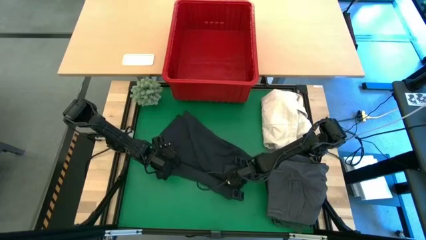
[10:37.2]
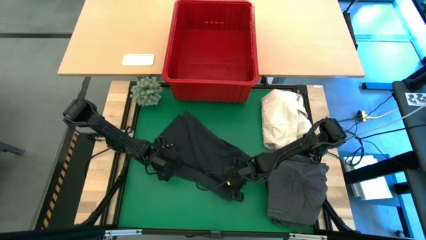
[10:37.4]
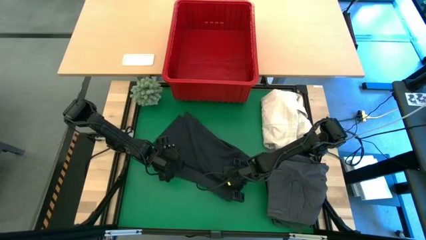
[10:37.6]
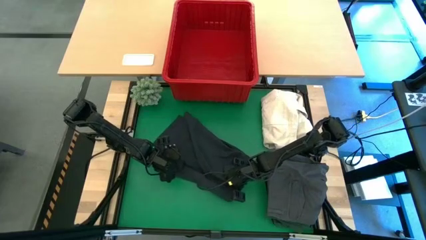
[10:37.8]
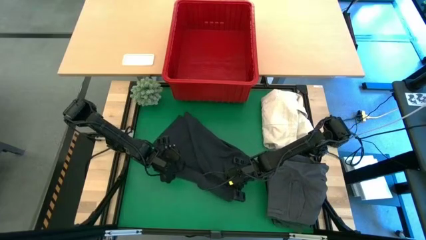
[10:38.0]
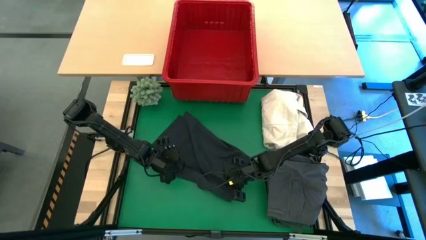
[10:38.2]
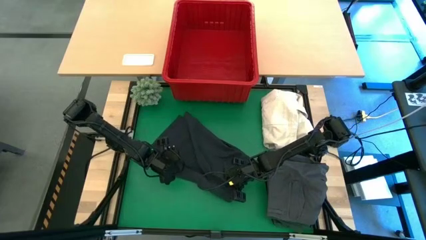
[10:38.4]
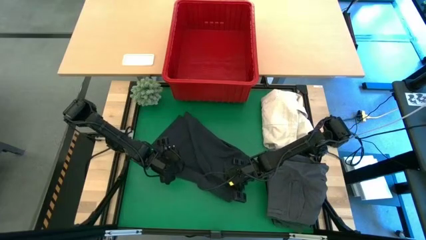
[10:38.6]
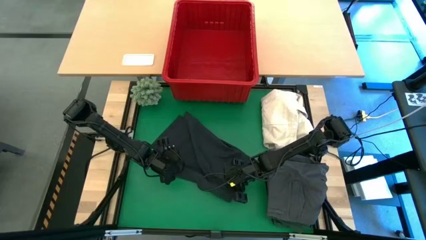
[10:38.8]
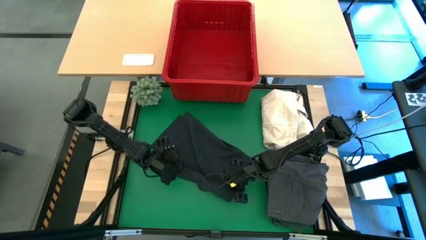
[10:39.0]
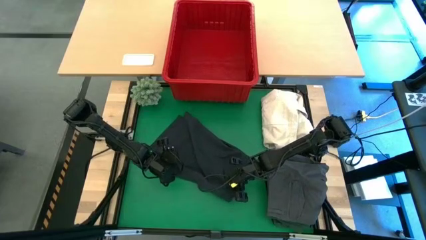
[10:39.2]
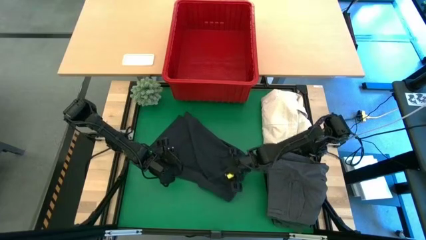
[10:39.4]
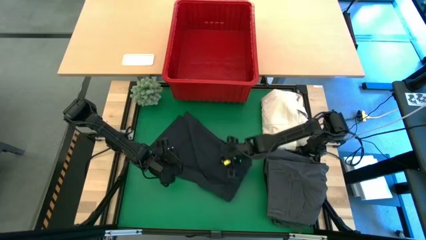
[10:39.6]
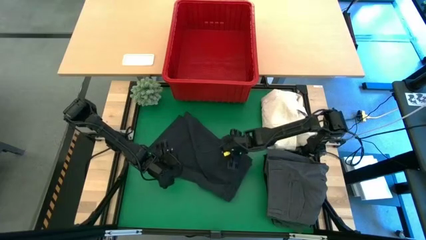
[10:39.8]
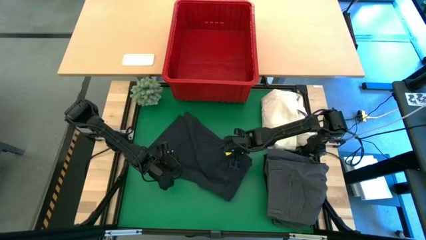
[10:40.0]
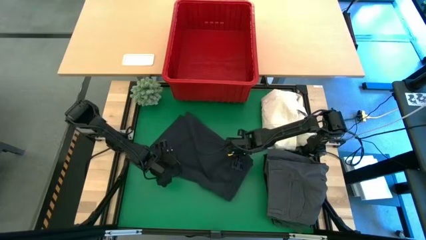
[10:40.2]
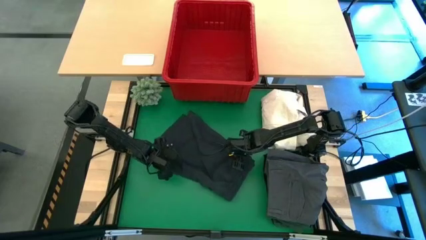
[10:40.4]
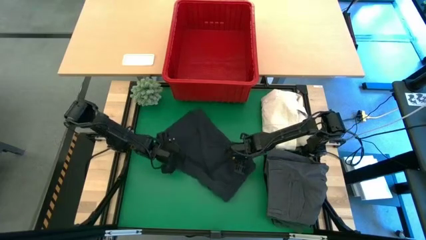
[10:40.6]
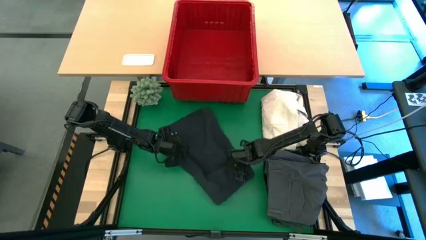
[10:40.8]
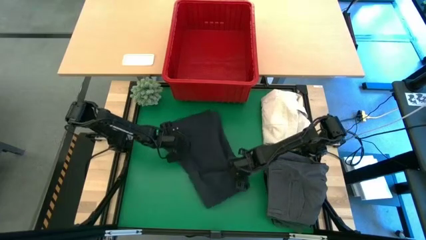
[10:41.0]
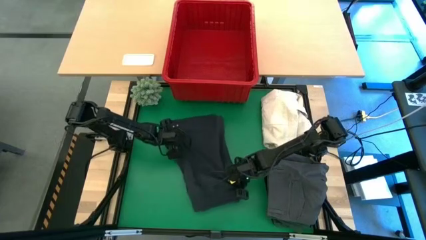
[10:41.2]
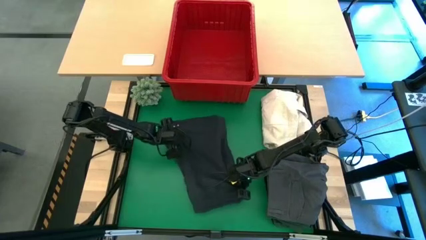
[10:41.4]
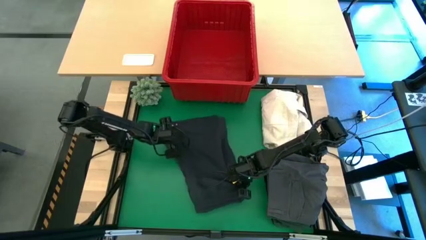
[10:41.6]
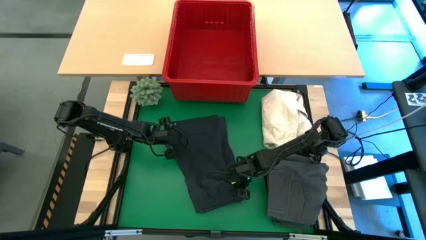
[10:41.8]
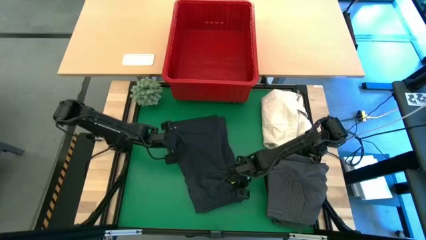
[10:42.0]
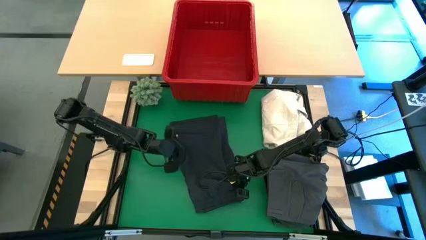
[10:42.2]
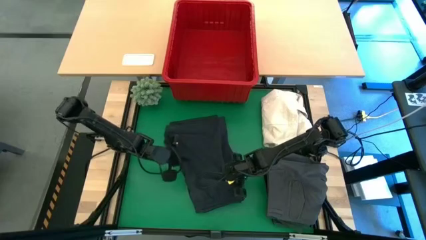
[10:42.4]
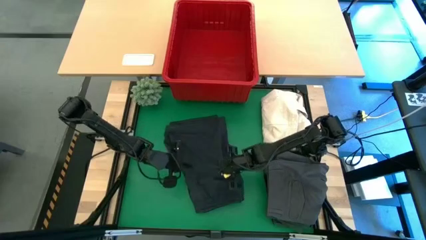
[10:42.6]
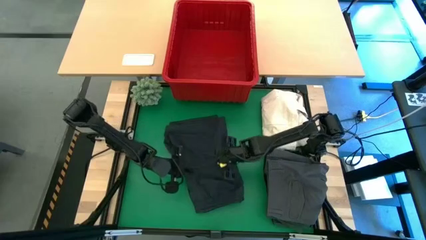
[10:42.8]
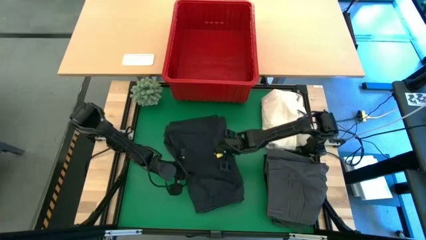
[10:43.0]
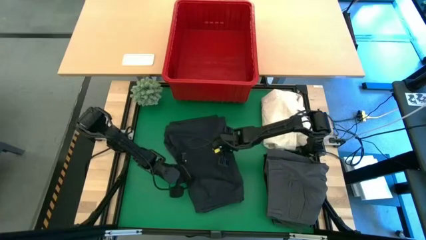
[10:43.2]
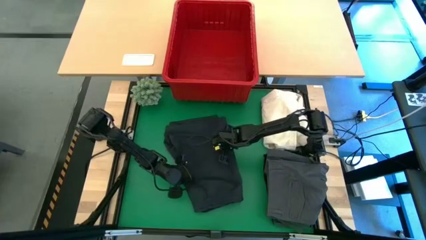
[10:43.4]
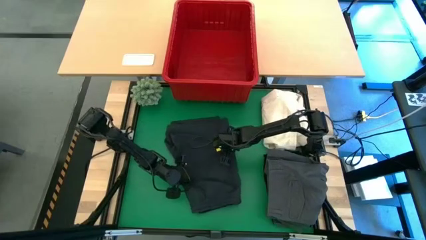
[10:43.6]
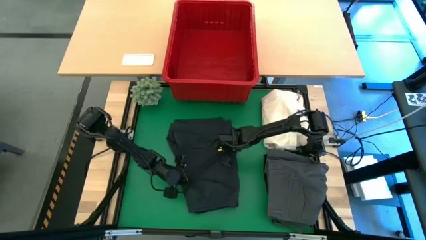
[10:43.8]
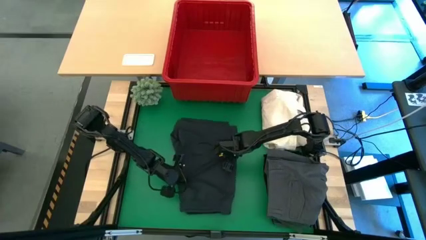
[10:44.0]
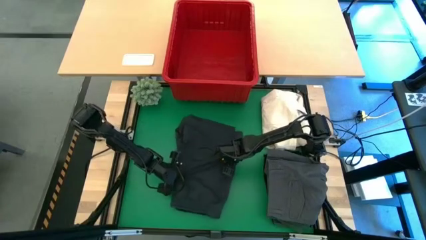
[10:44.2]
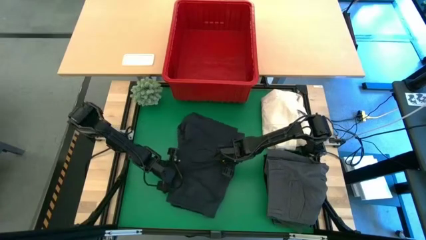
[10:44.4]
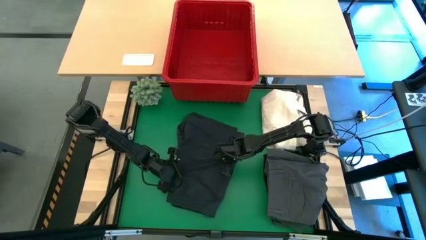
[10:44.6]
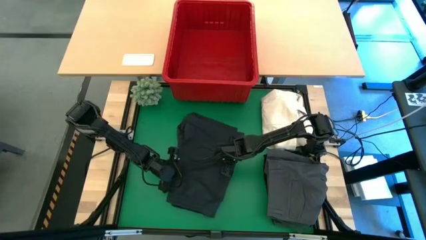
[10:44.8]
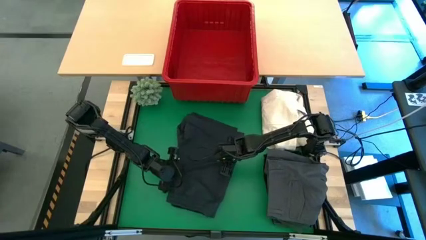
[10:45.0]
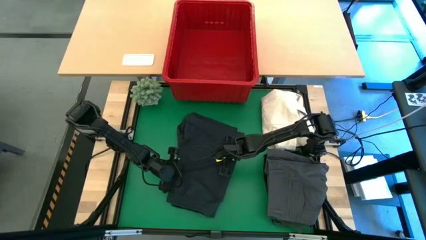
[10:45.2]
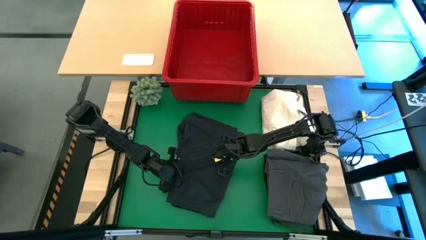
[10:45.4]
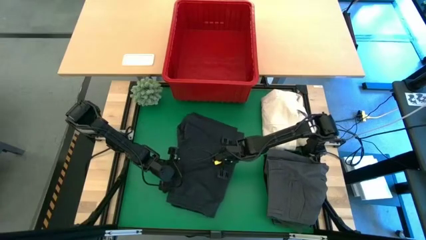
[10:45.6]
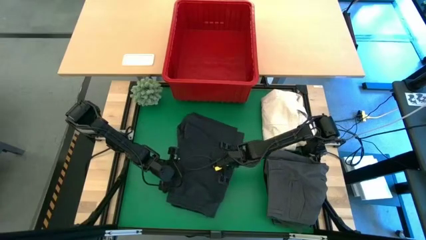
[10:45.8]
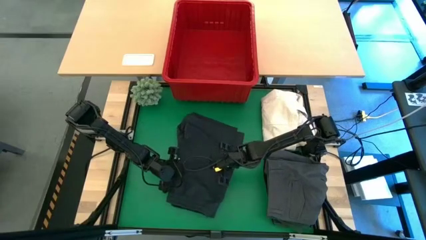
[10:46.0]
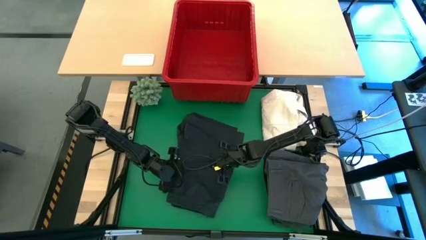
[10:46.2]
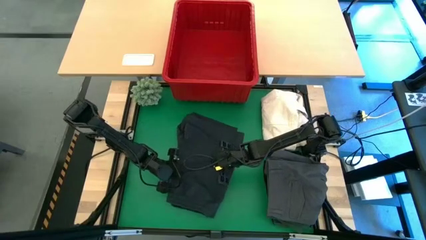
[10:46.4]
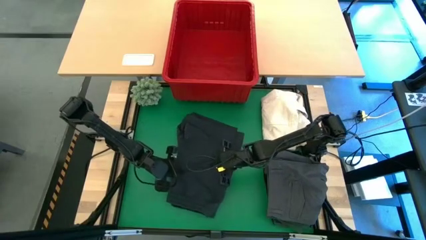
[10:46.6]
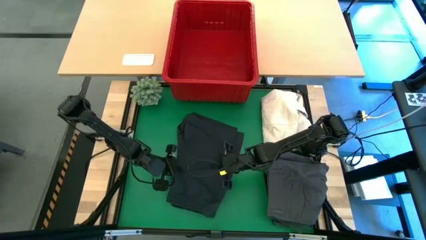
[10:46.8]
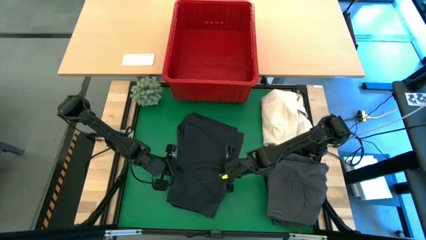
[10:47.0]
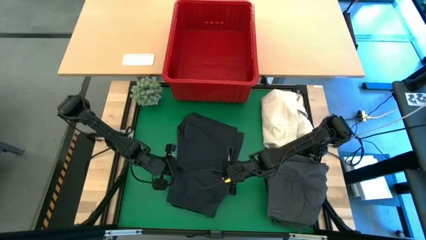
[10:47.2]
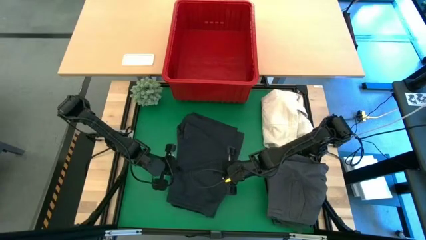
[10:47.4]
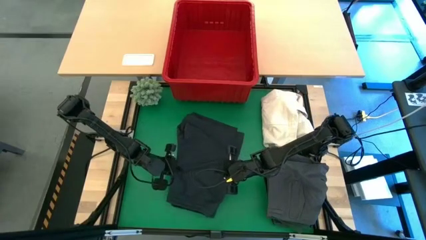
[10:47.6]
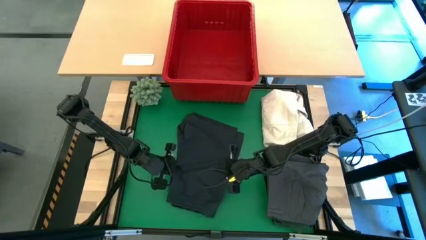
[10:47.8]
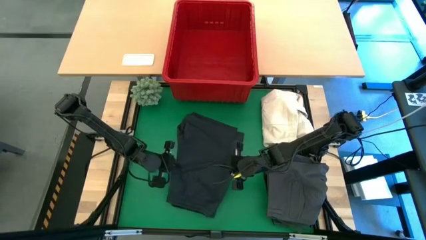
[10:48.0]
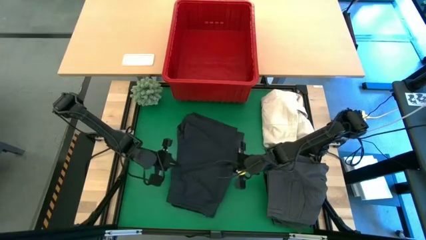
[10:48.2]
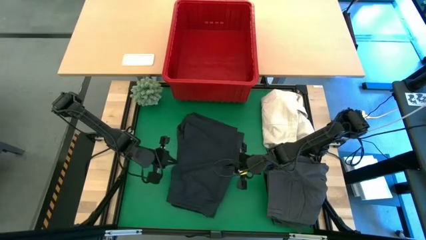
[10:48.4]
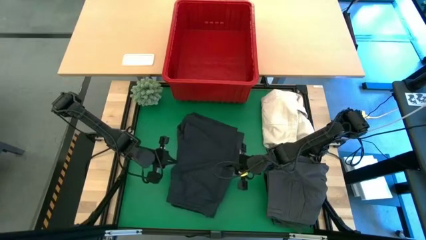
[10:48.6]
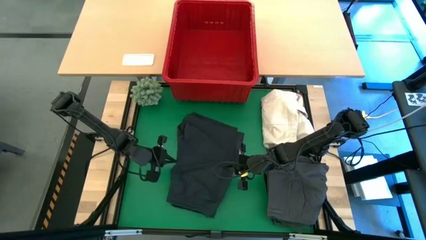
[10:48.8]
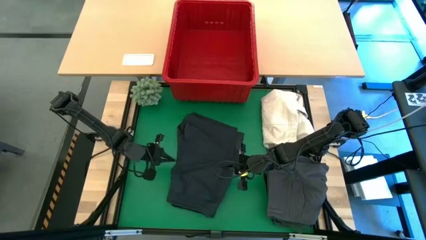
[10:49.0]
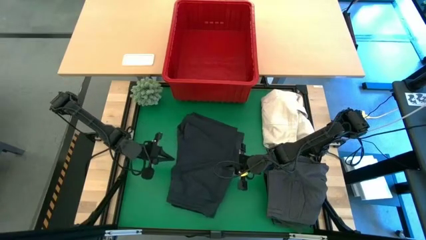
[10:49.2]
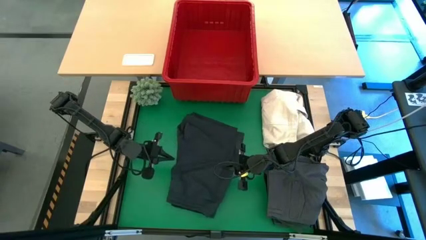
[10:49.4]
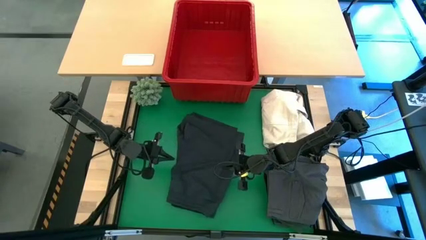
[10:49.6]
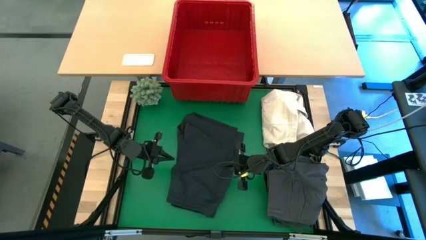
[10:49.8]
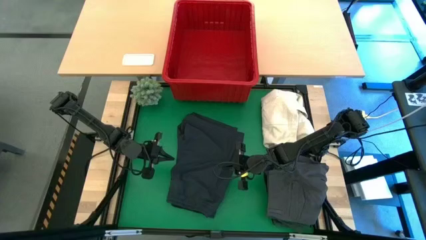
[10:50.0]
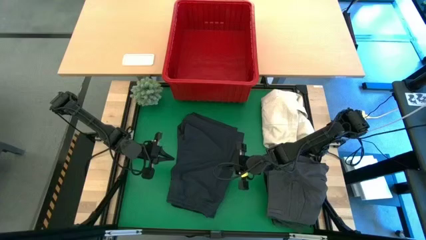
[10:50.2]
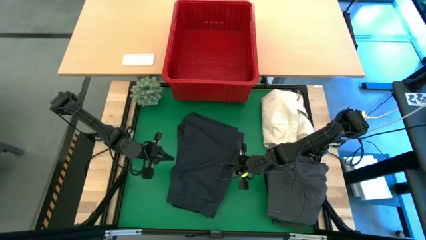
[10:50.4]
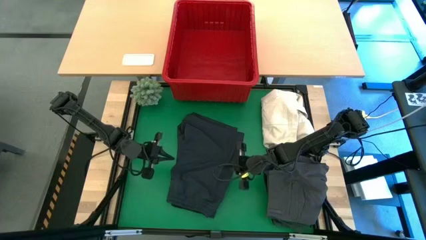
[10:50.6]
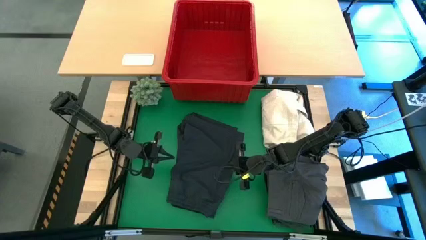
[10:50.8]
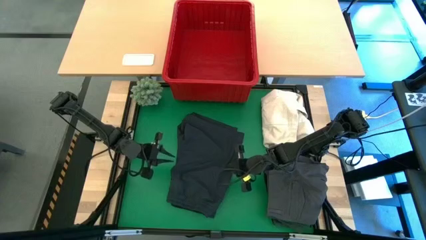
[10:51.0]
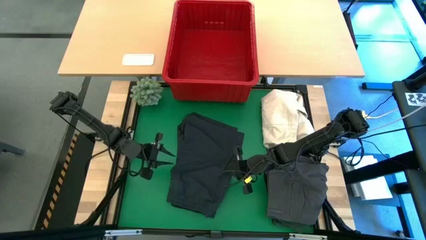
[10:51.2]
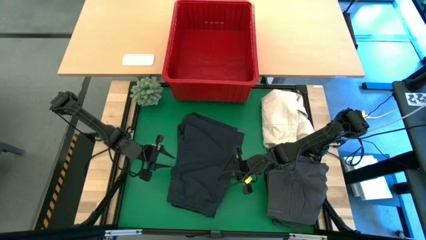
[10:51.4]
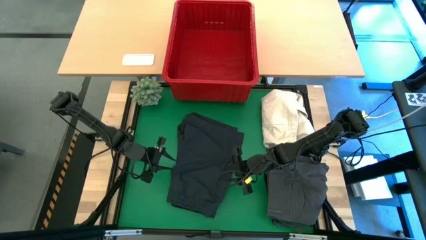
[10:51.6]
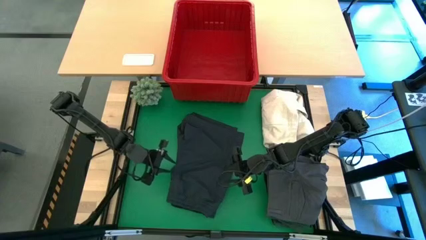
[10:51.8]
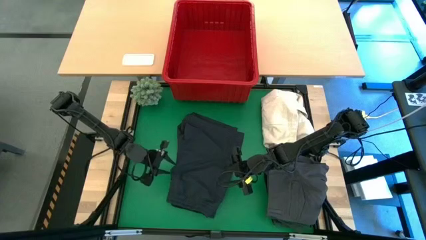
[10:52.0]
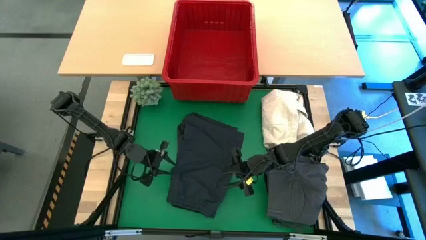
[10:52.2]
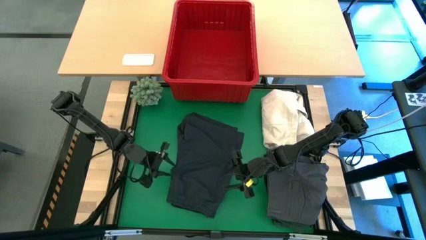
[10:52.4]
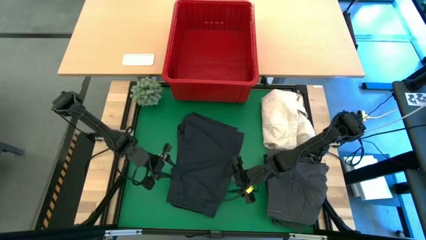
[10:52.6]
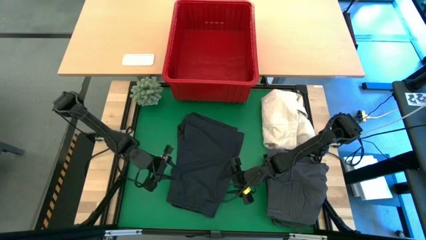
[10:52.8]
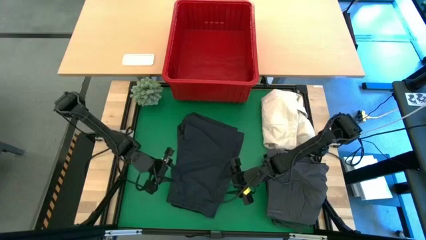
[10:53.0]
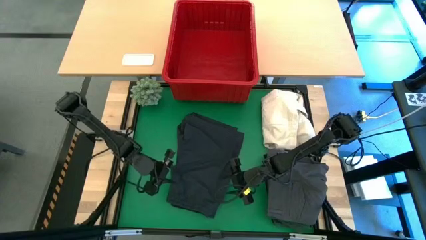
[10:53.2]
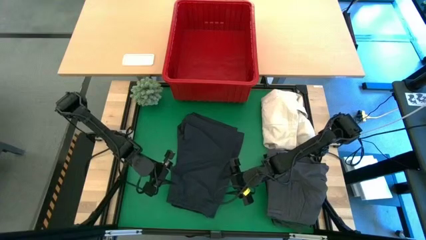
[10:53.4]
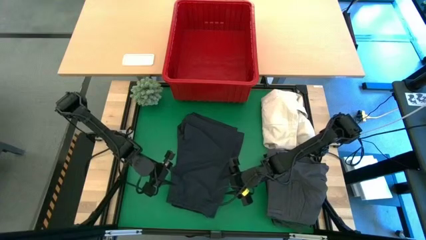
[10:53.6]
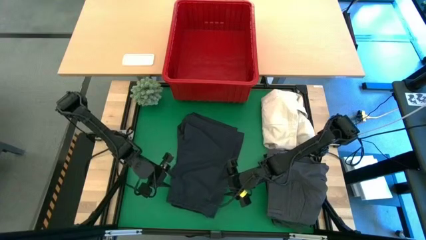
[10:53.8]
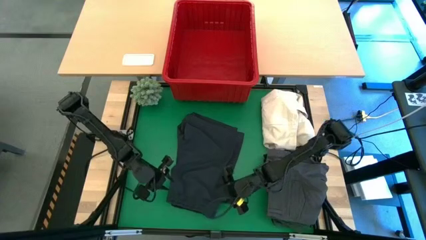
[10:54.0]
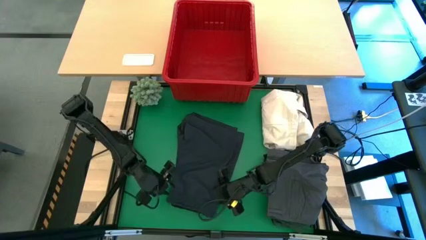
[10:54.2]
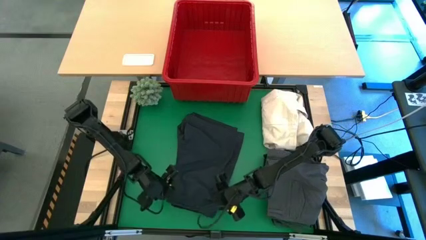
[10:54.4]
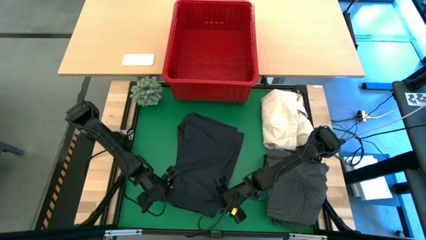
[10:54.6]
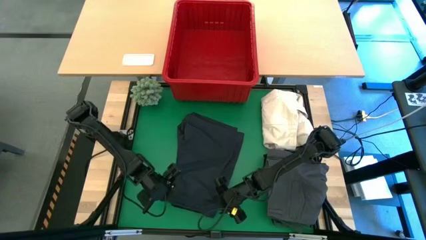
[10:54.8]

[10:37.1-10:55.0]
Task: Fold laundry
Fold the gray short
